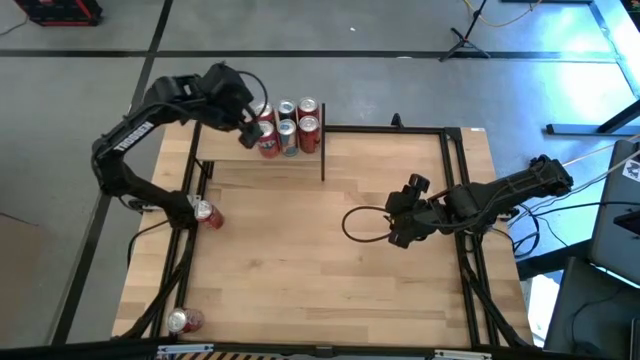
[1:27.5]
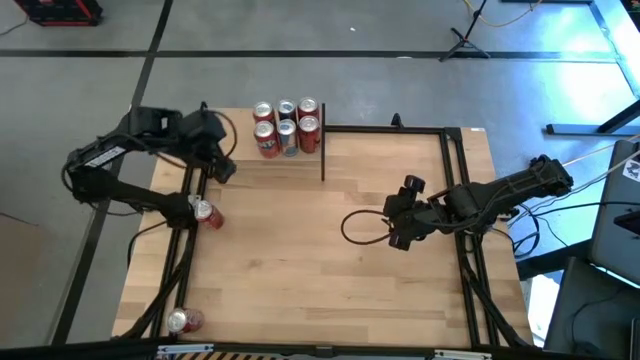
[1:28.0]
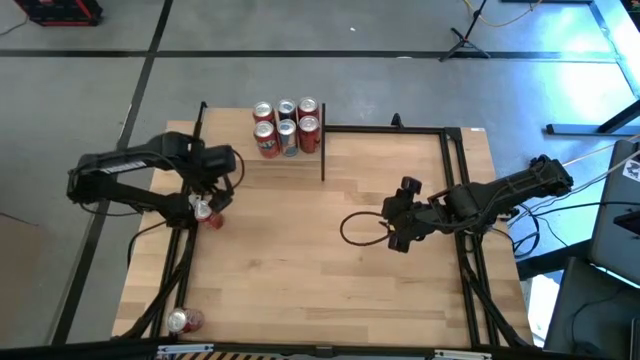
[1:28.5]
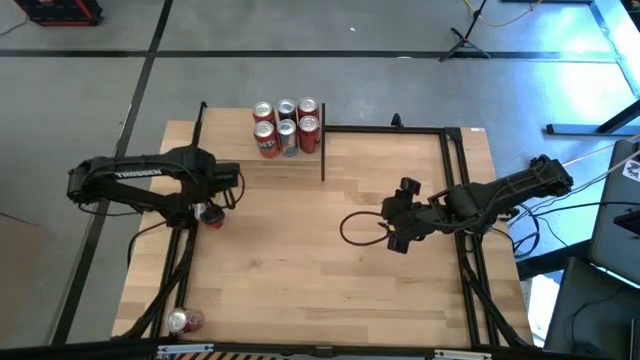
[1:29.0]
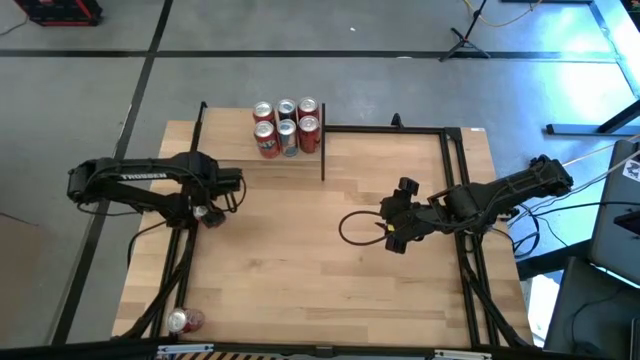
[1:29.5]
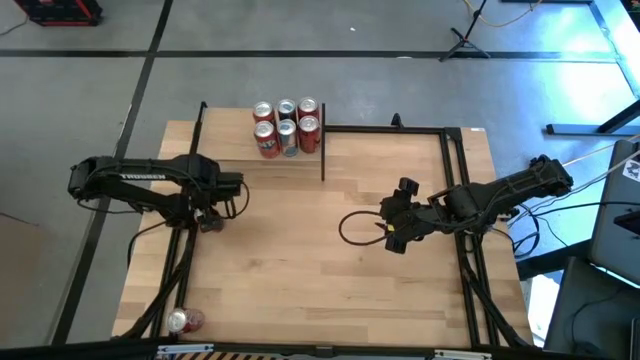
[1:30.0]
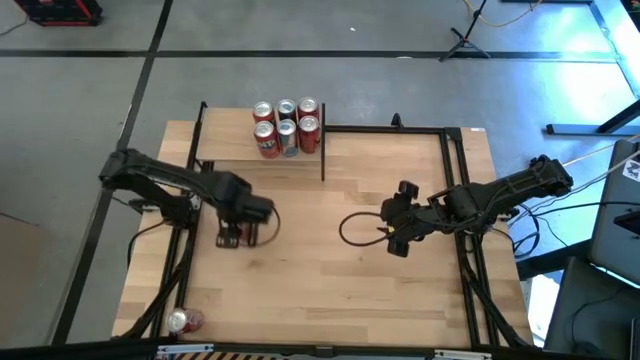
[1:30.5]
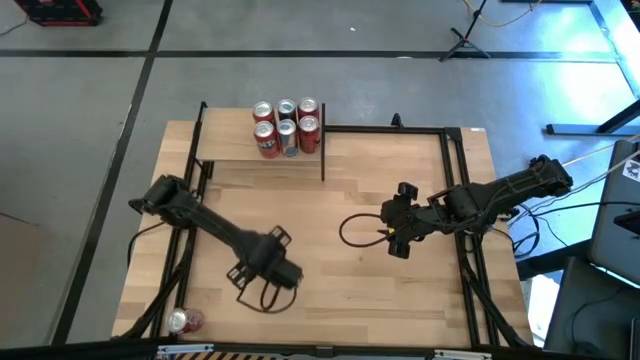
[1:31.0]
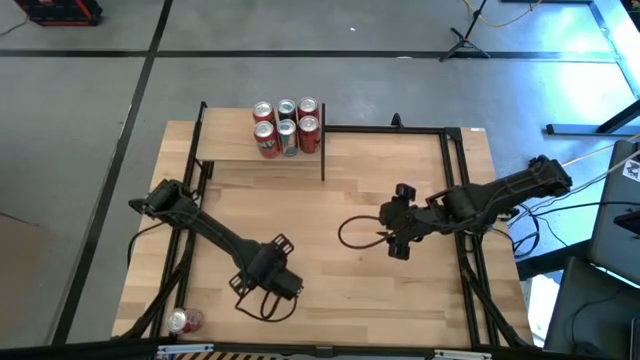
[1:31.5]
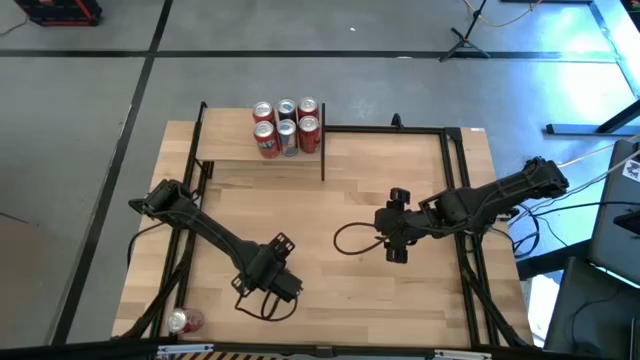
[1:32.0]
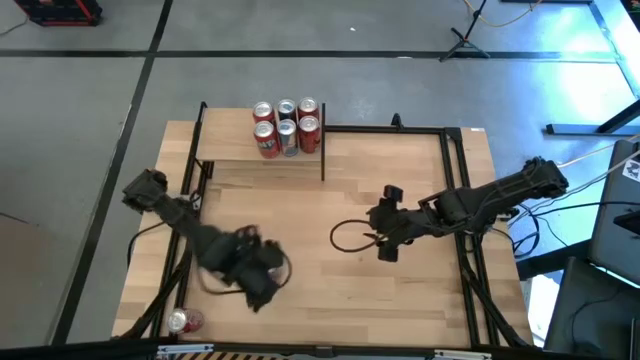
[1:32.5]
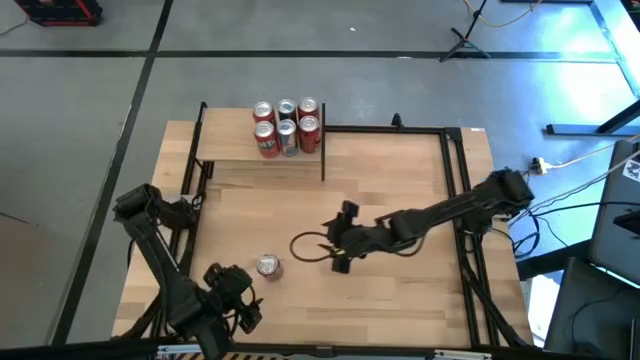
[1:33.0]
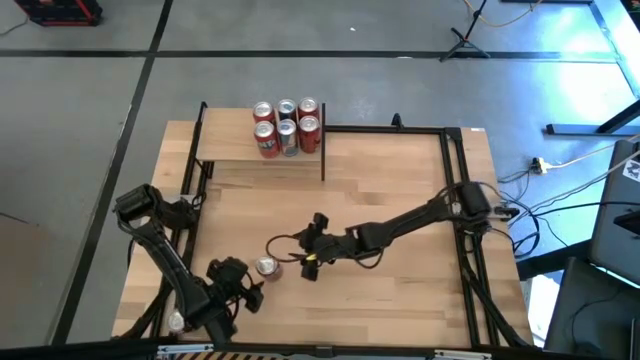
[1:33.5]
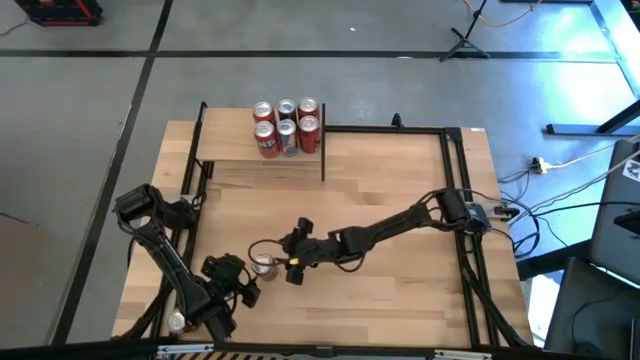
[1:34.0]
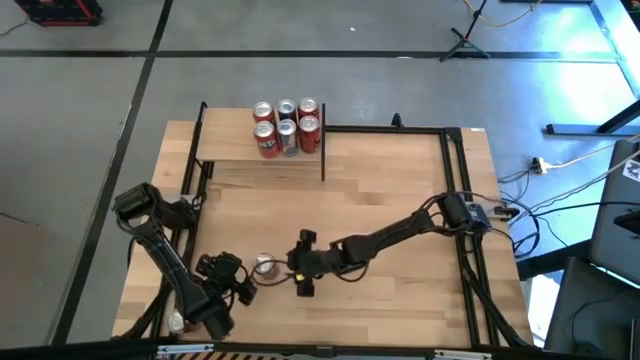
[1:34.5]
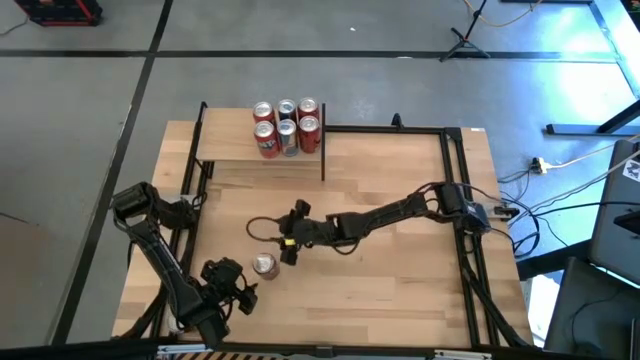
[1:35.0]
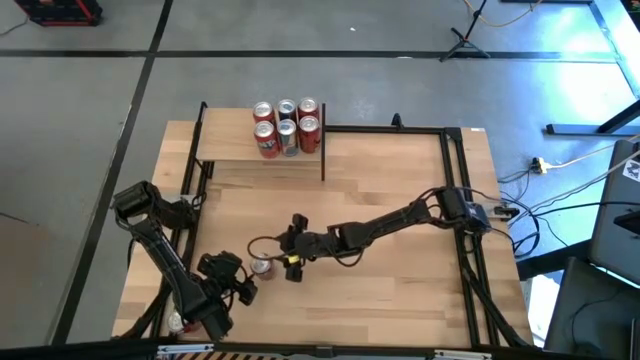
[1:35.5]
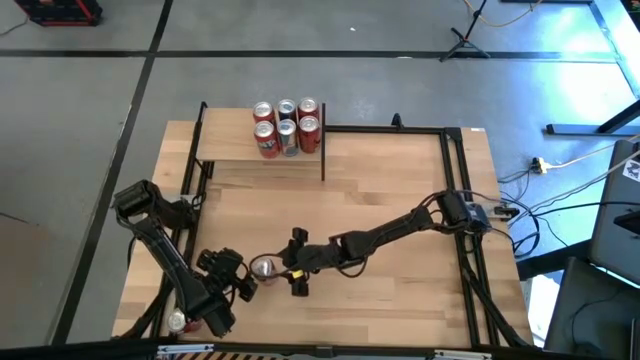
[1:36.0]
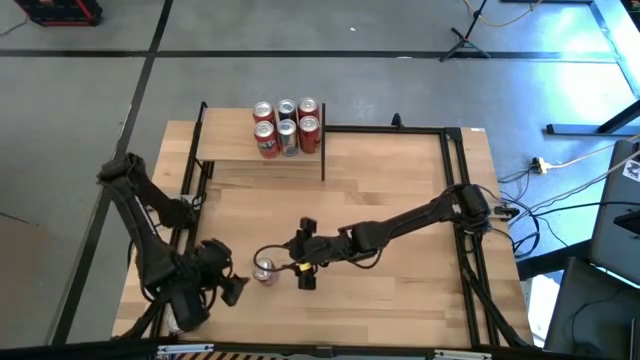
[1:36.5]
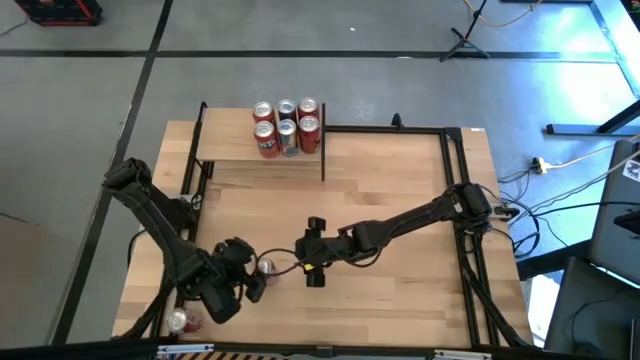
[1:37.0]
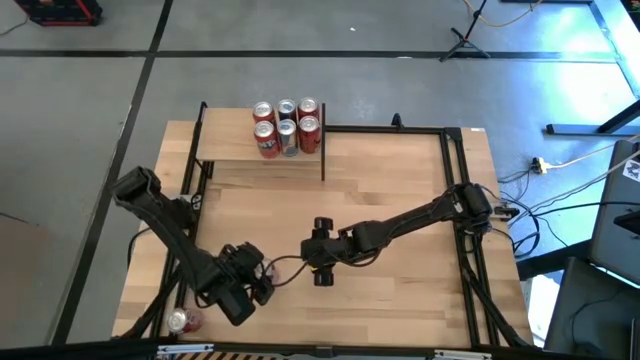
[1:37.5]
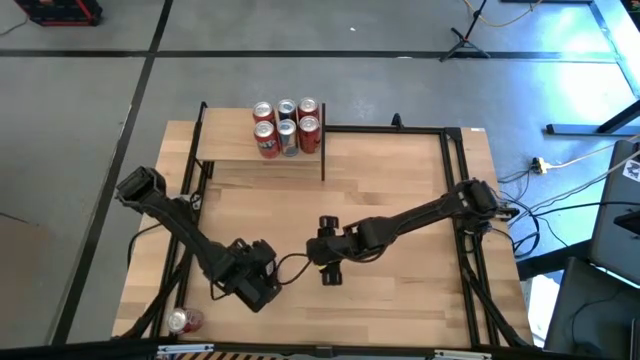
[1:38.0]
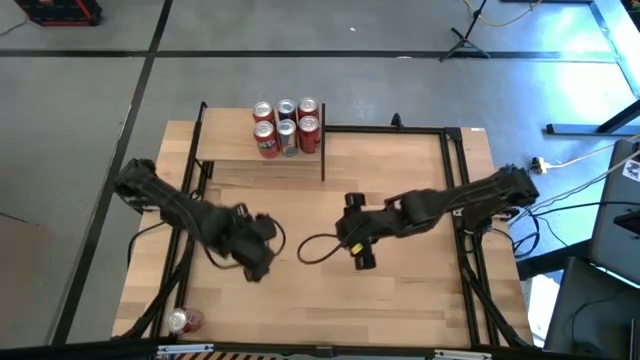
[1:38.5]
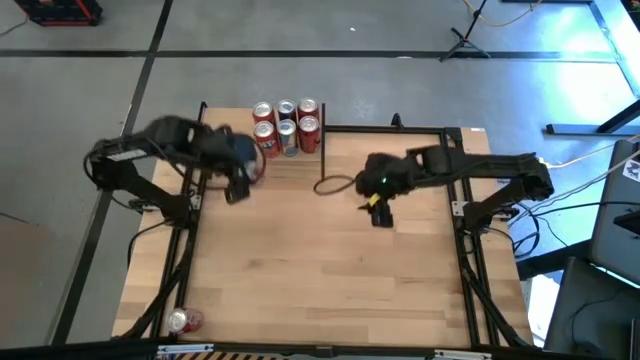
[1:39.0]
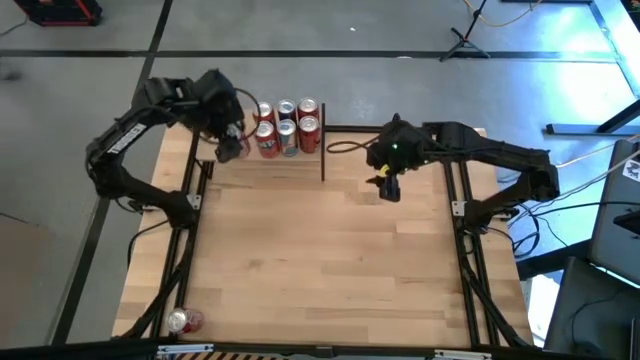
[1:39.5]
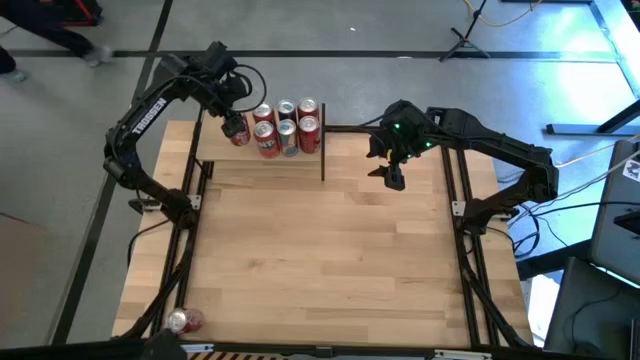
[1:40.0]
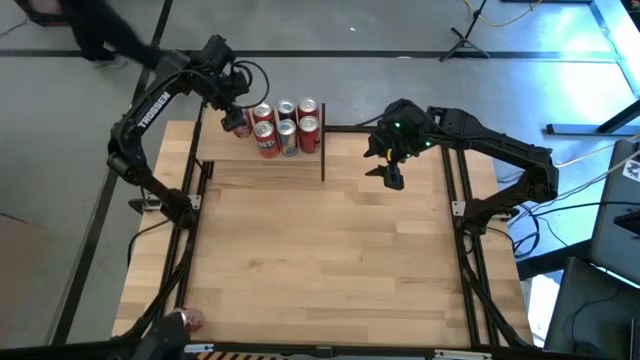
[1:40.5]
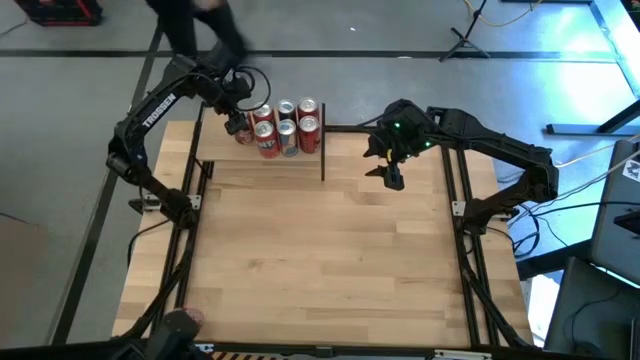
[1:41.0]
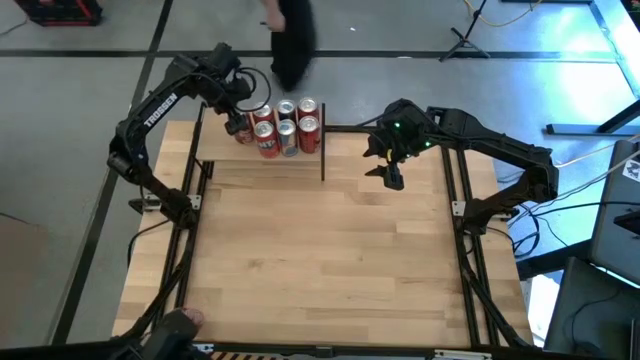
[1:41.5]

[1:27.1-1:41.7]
Task: Place canned beverage on shelf
Put the top red-white soda can on the shelf

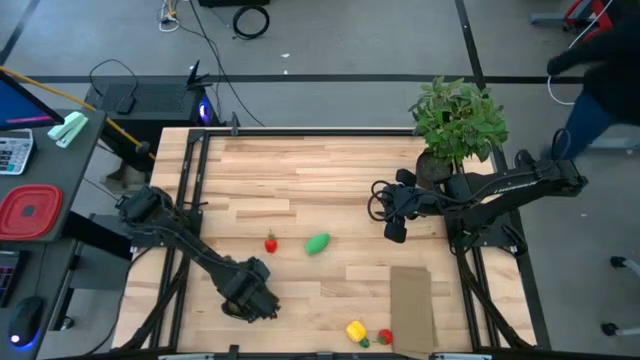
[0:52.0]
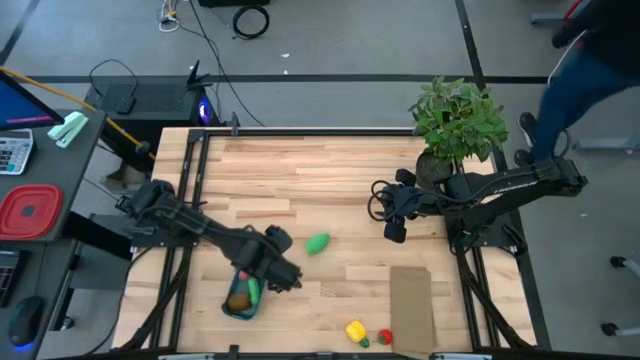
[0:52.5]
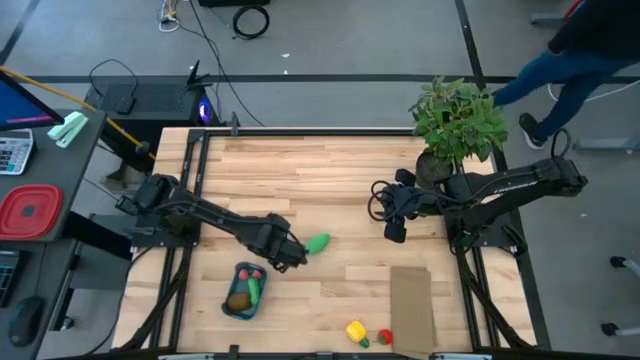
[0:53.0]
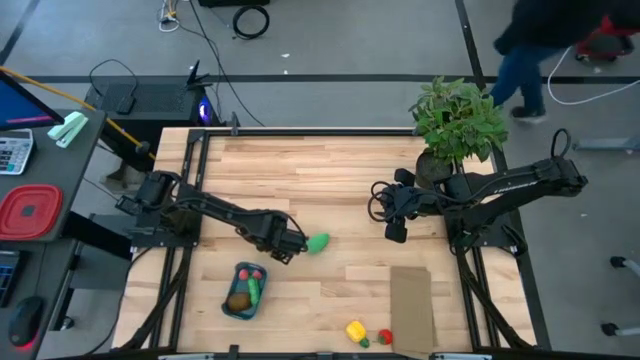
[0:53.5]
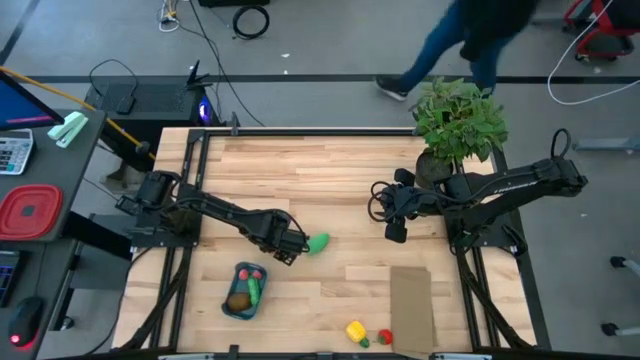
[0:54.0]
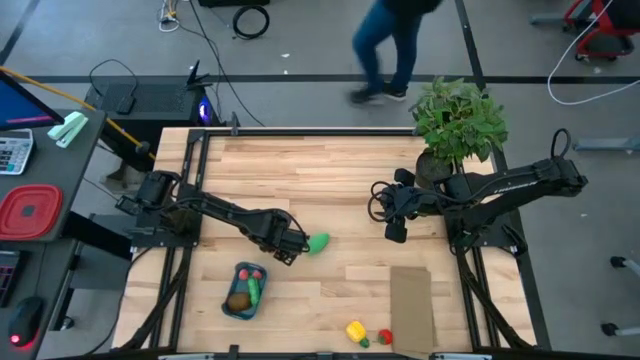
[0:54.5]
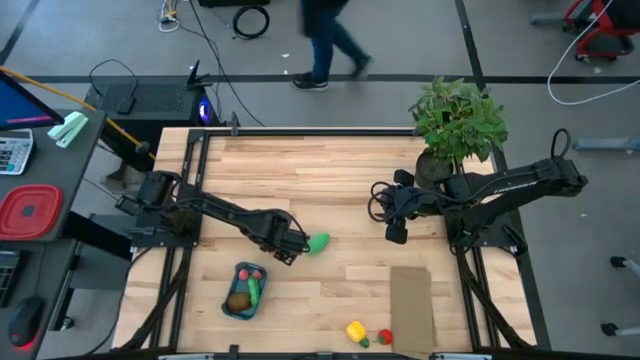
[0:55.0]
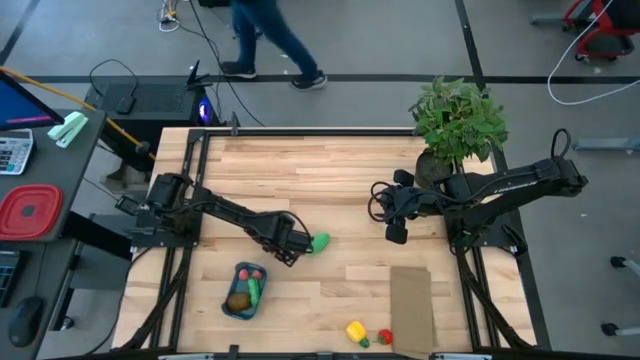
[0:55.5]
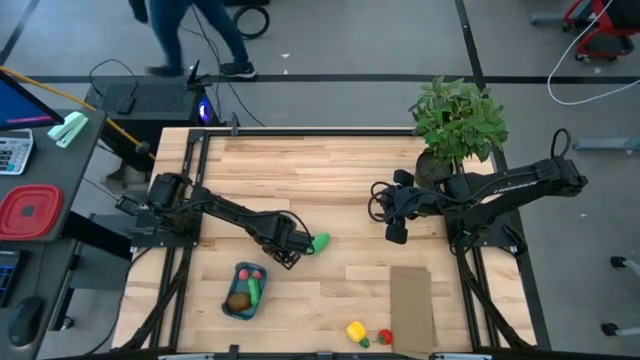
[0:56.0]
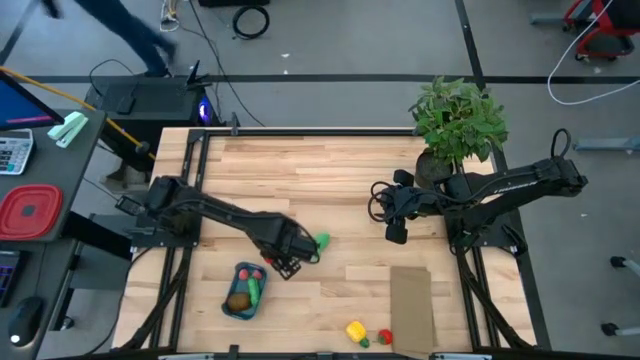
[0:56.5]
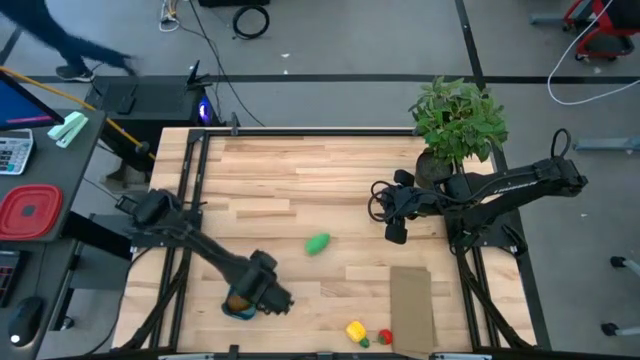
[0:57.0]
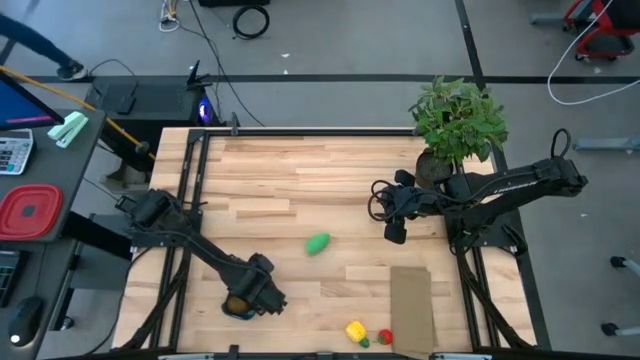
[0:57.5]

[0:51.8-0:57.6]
Task: Pick and placing Produce into tupperware
Put the top red strawberry into the blue bin
